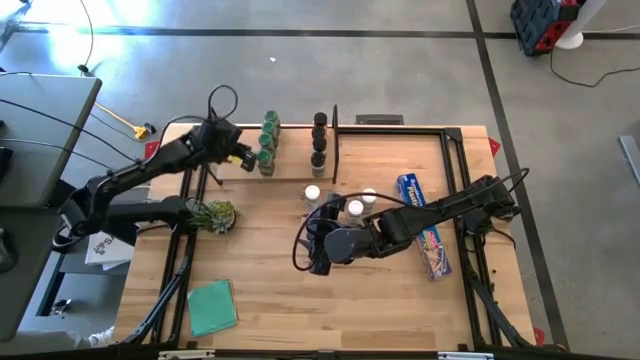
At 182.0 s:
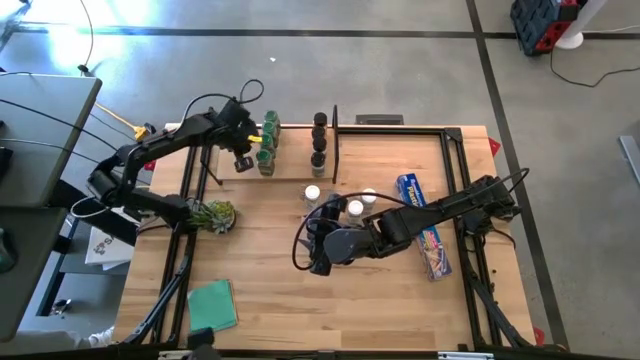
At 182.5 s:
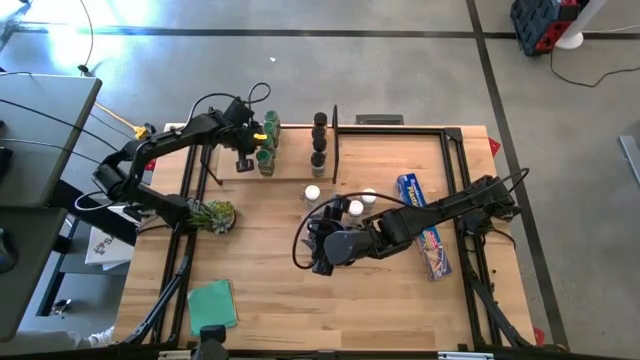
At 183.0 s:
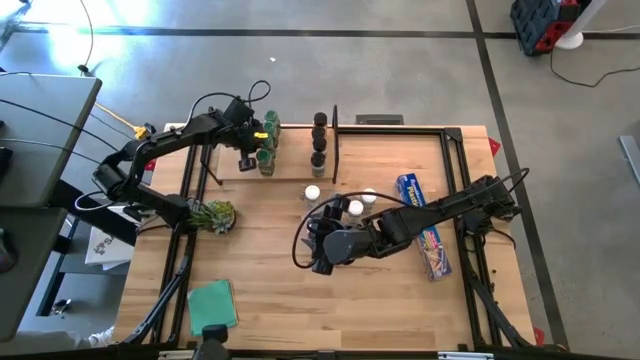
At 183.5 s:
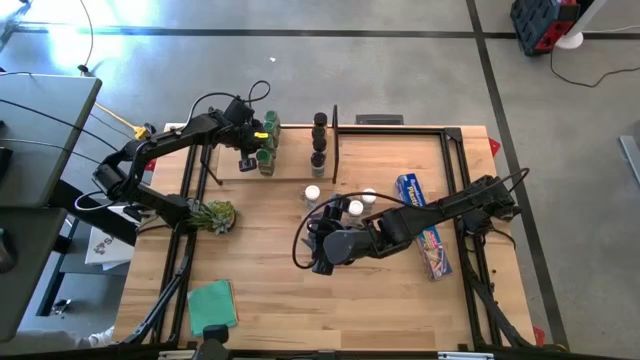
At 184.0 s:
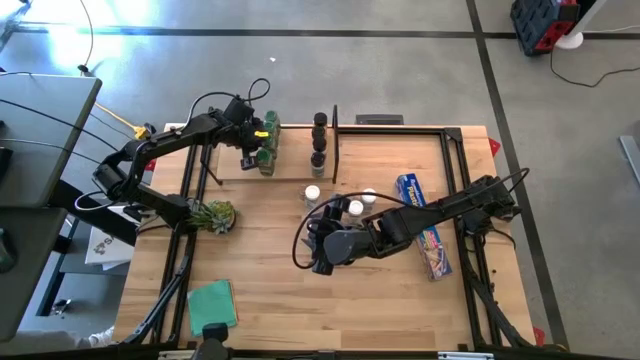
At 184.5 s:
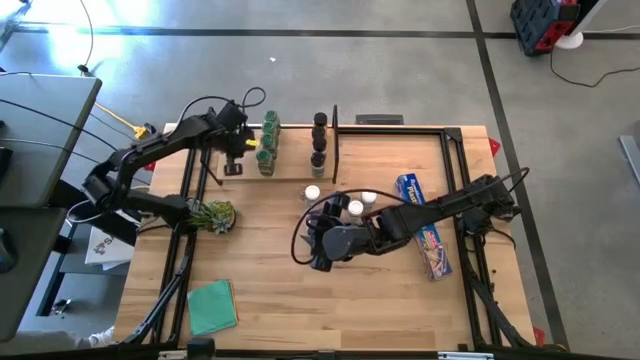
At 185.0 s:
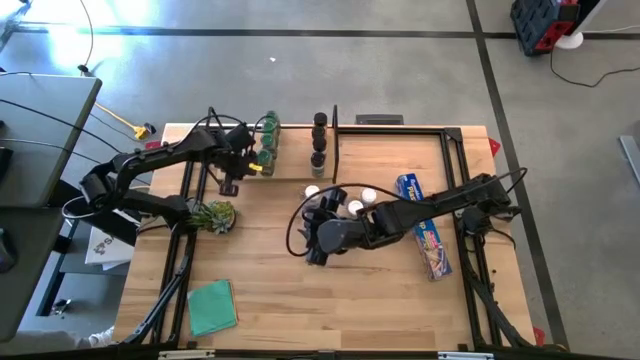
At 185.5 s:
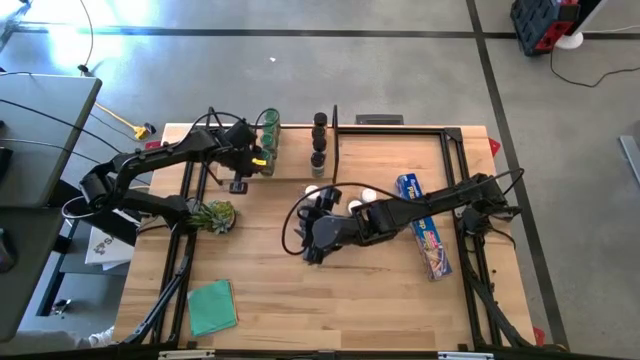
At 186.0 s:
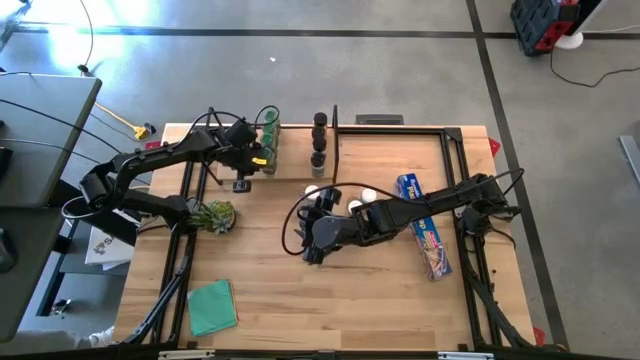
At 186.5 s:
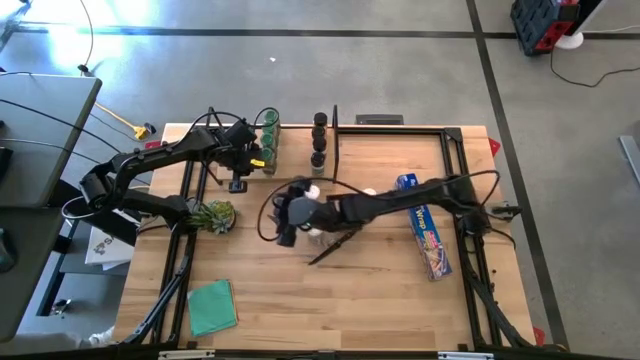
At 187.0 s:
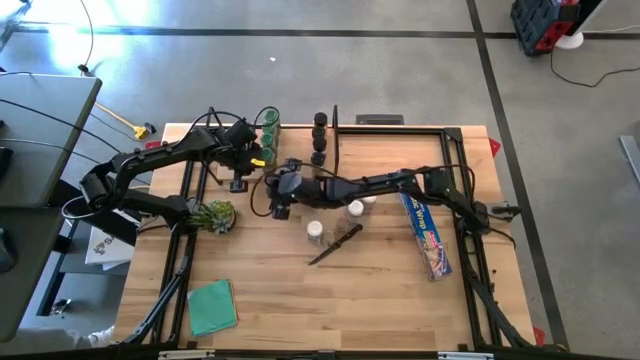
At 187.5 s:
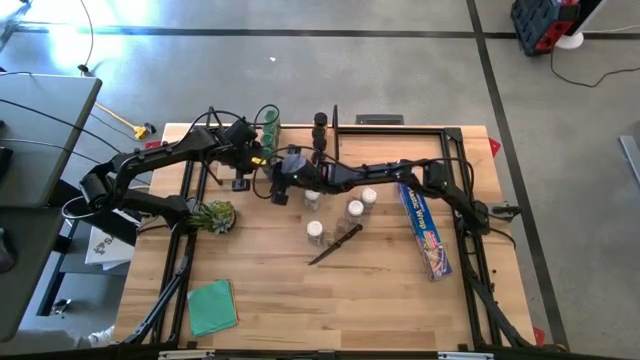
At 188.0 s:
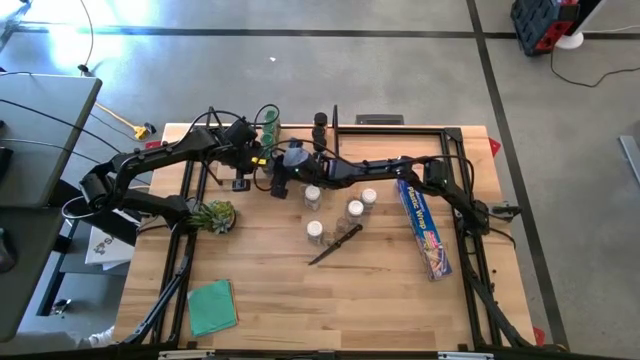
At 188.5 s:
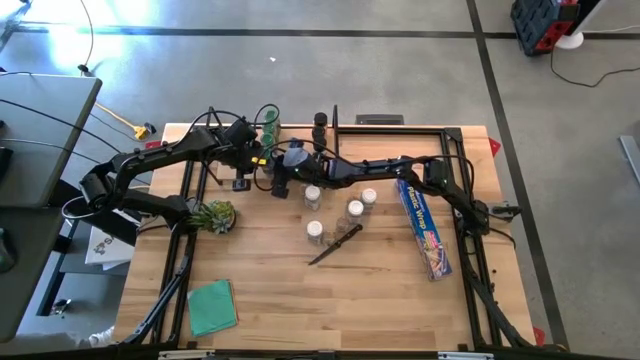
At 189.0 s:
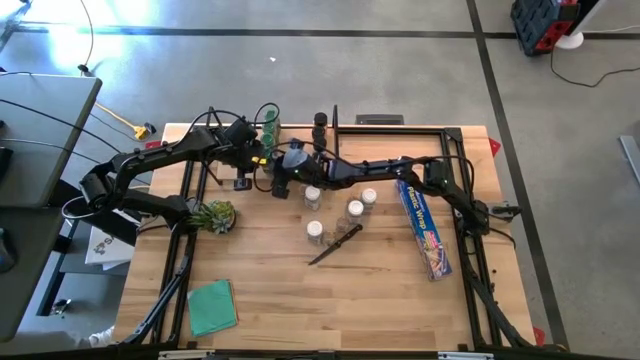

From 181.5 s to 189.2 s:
Task: Shelf spices
Adjust the green lid seasoning bottles

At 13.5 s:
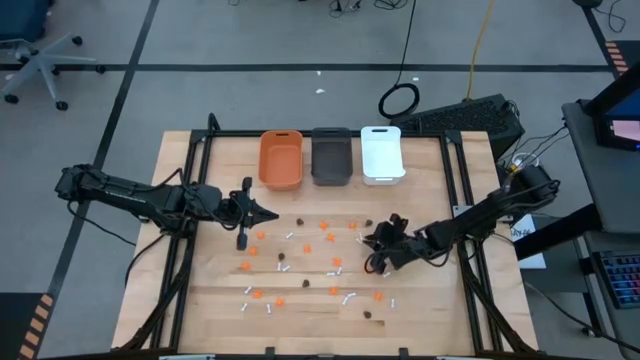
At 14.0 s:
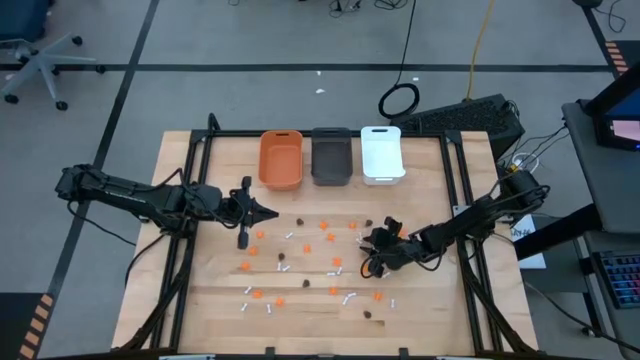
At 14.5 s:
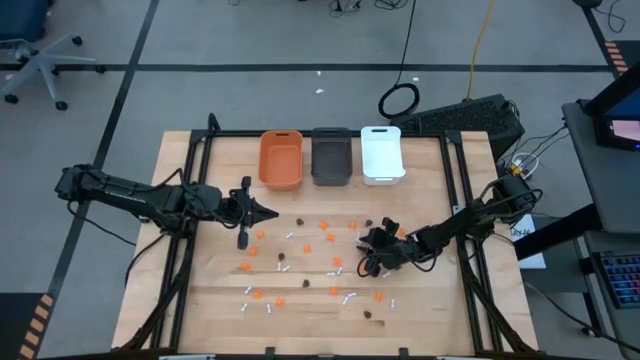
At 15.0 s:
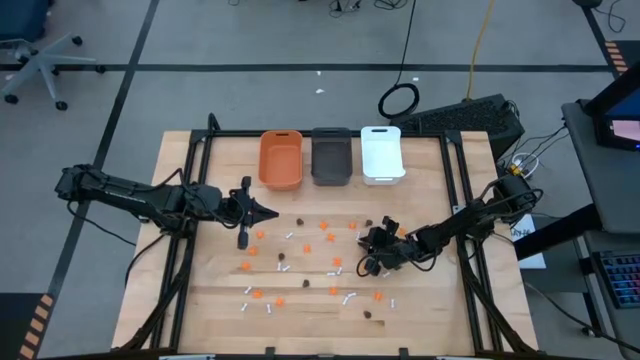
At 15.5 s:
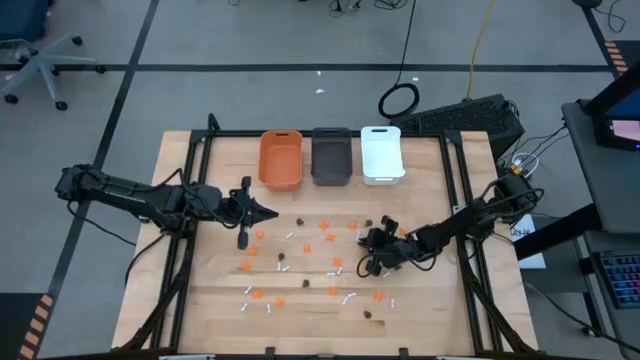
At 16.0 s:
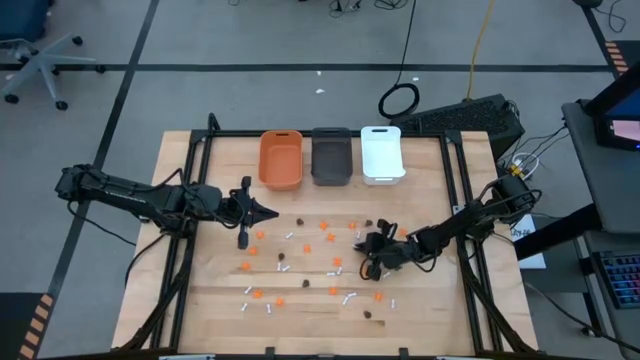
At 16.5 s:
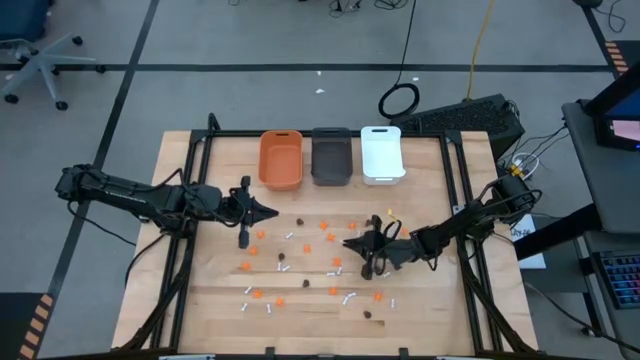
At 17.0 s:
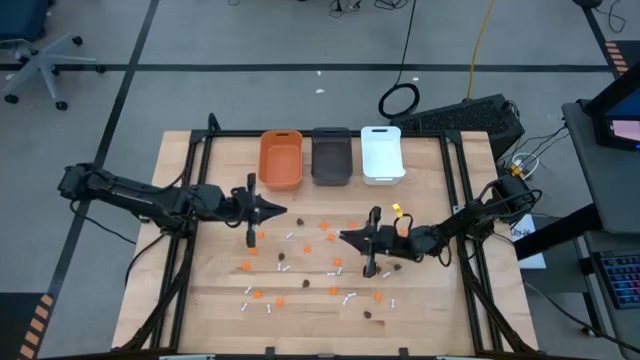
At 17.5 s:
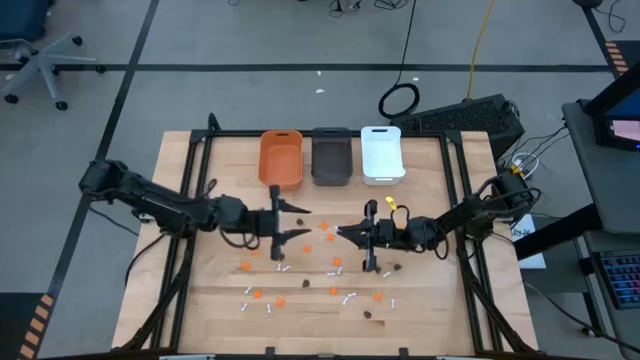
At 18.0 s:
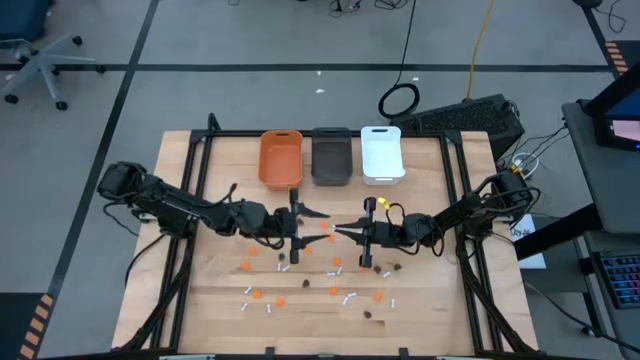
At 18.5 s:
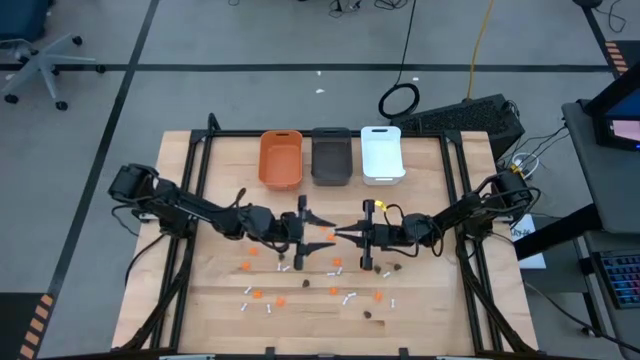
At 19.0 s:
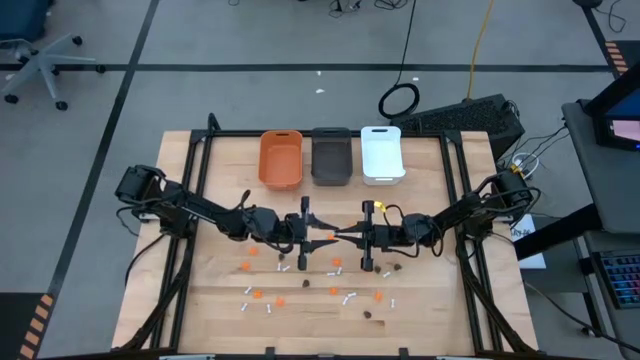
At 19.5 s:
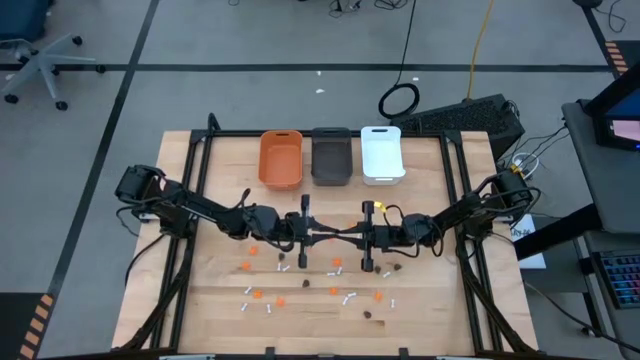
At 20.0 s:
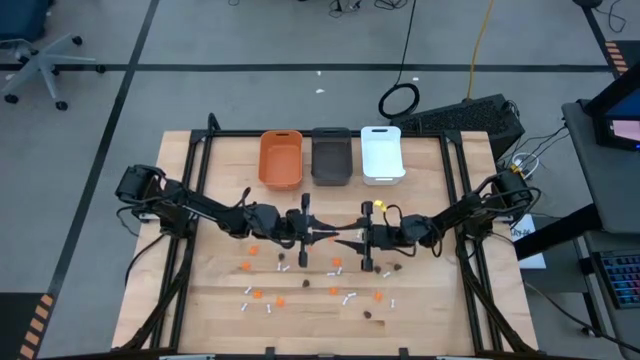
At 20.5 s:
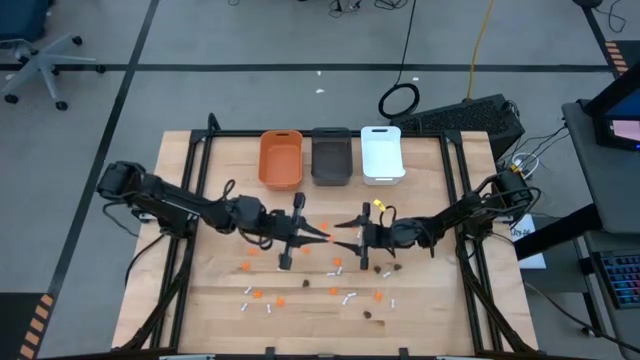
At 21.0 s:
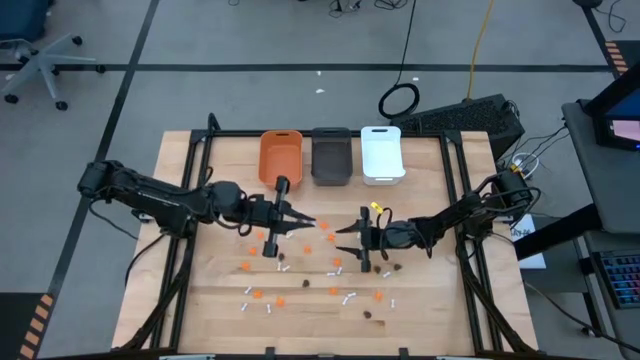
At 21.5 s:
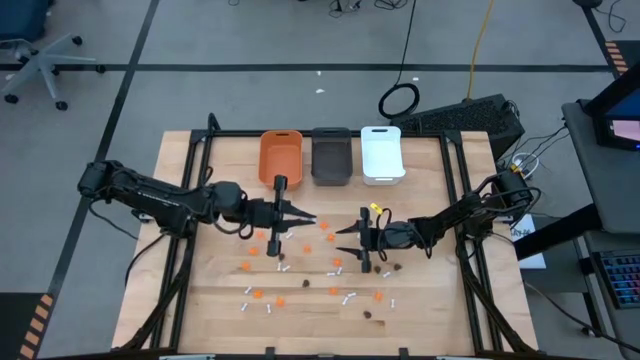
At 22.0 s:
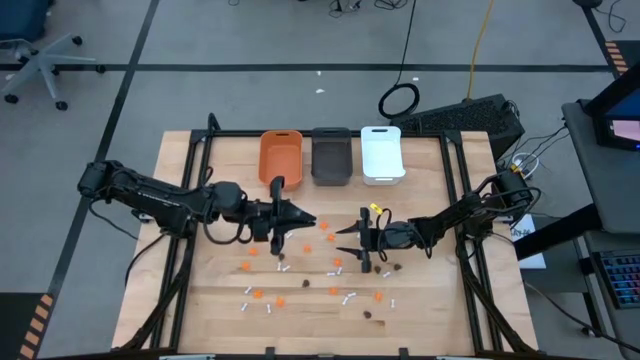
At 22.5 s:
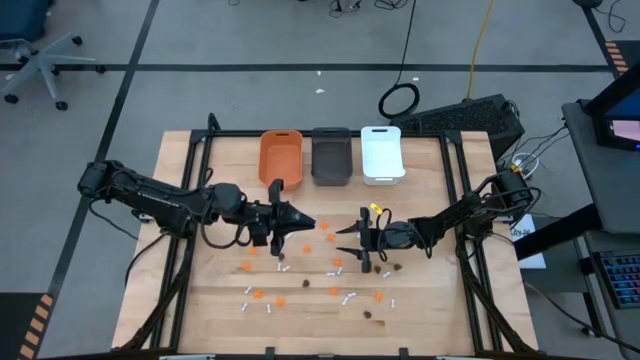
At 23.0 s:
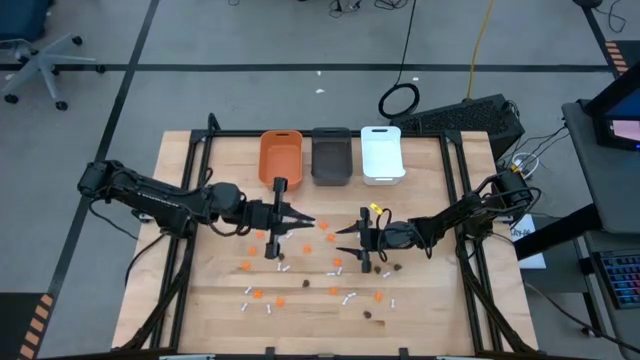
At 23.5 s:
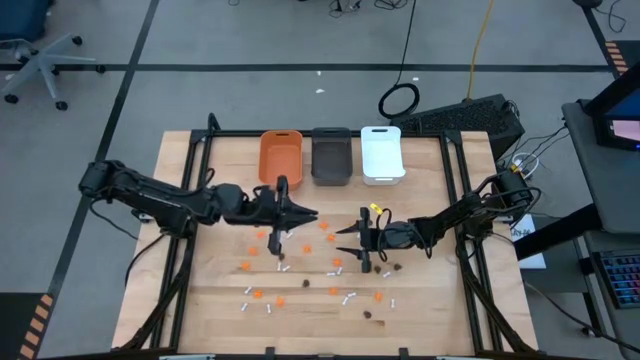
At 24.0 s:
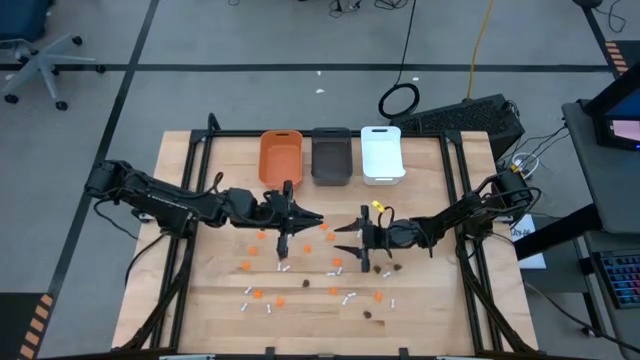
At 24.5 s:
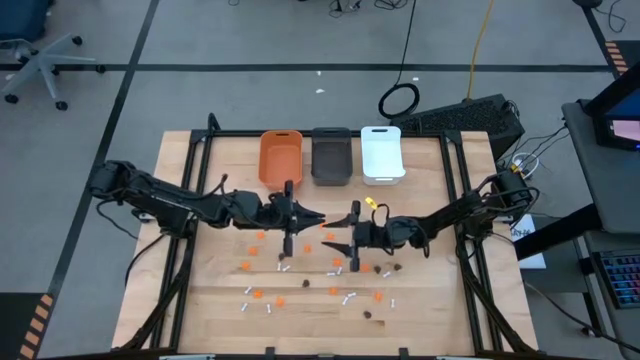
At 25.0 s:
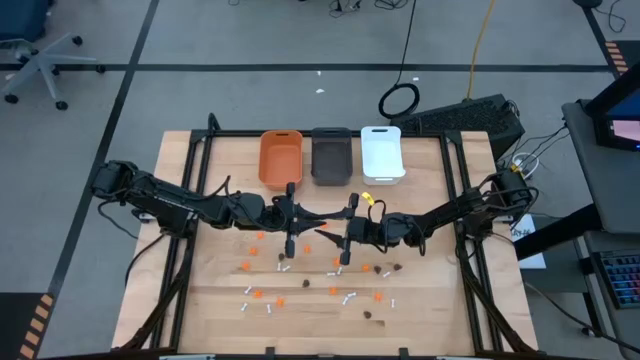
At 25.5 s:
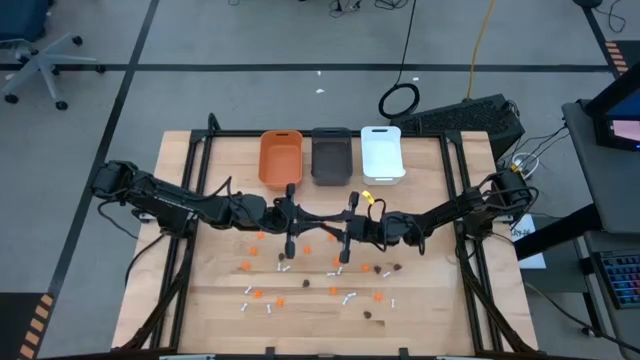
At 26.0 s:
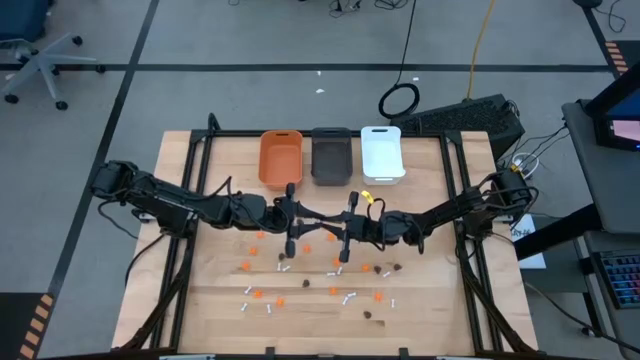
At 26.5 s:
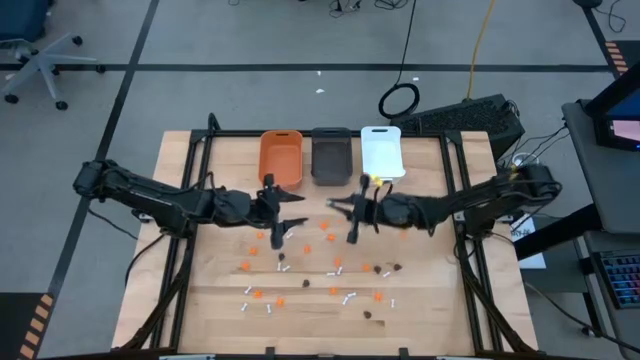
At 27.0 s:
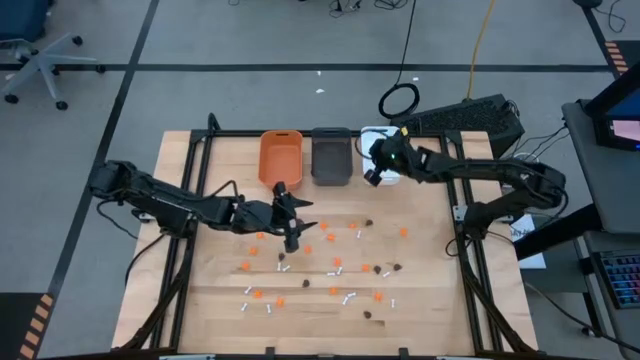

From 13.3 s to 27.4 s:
Task: Sort Halloween decoration
Put the white bone toy into the white bin
